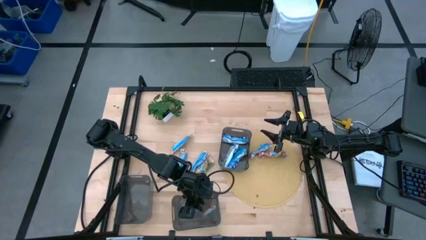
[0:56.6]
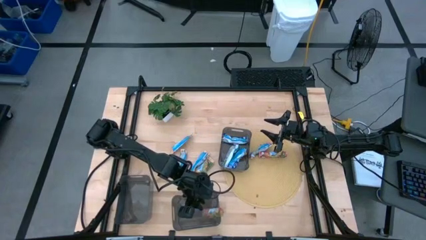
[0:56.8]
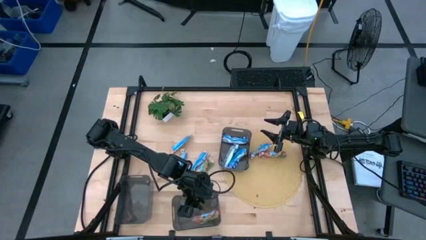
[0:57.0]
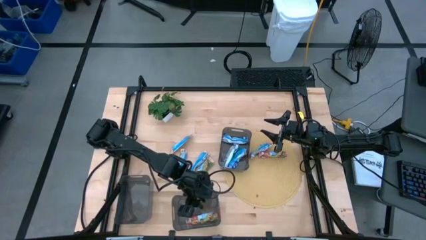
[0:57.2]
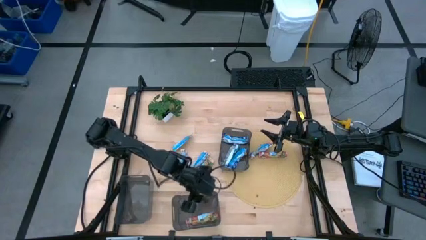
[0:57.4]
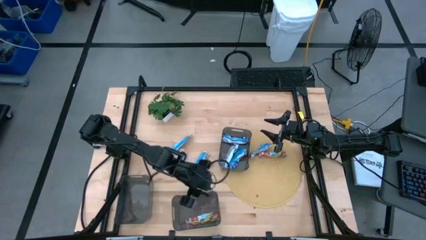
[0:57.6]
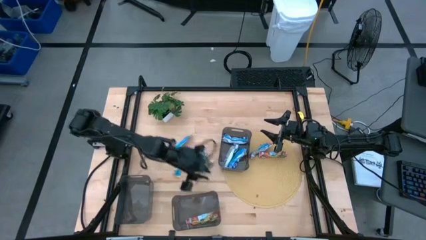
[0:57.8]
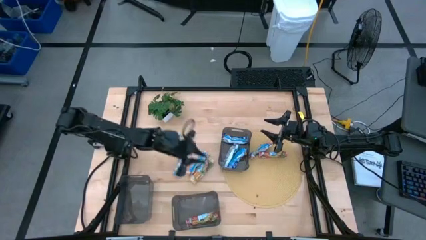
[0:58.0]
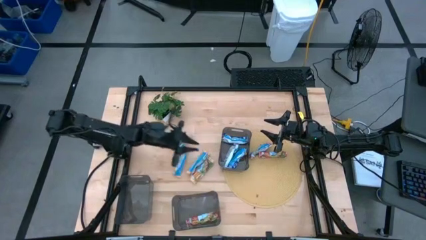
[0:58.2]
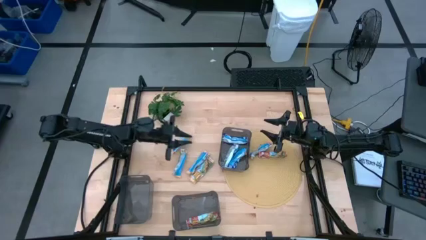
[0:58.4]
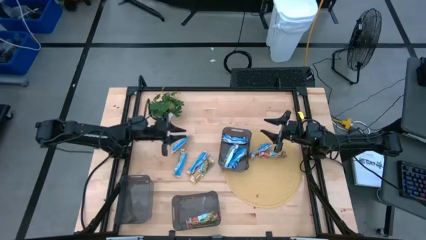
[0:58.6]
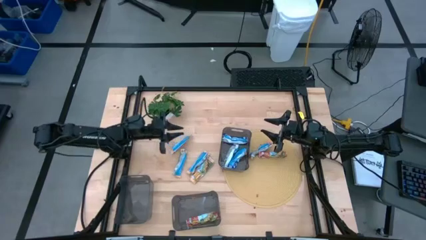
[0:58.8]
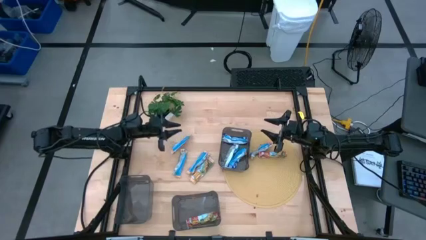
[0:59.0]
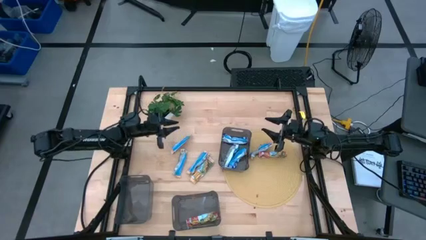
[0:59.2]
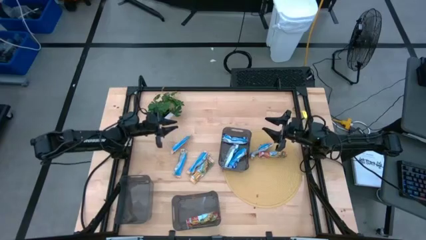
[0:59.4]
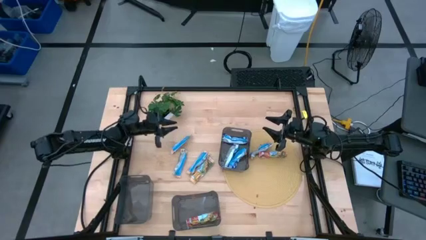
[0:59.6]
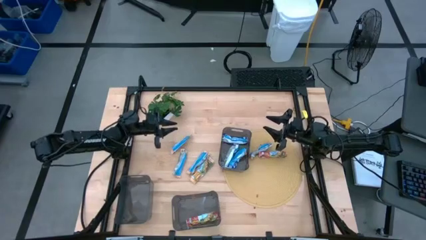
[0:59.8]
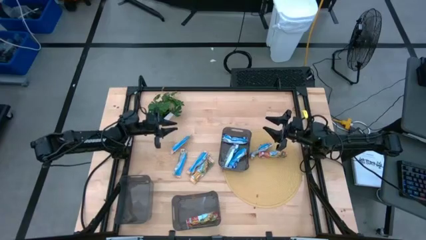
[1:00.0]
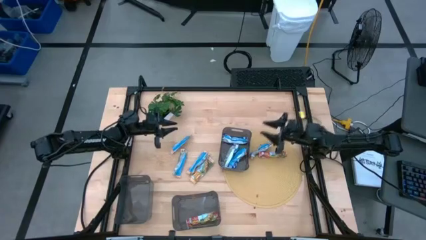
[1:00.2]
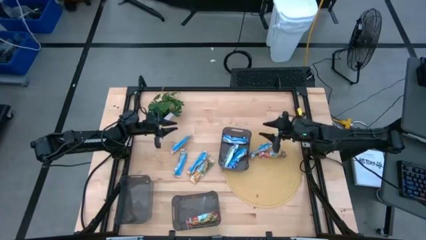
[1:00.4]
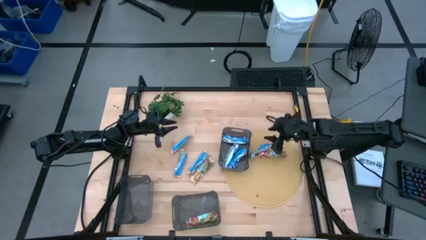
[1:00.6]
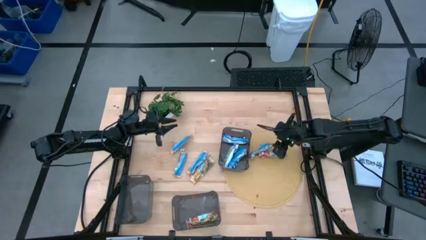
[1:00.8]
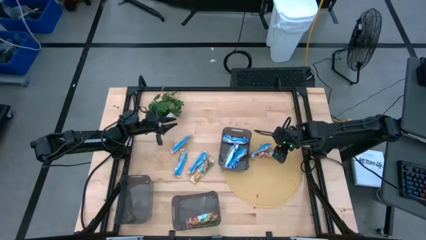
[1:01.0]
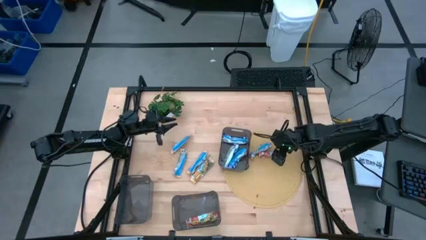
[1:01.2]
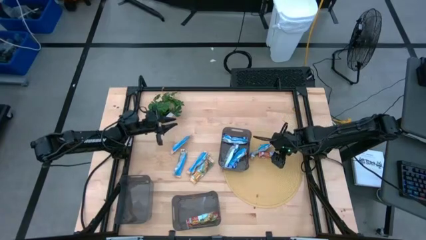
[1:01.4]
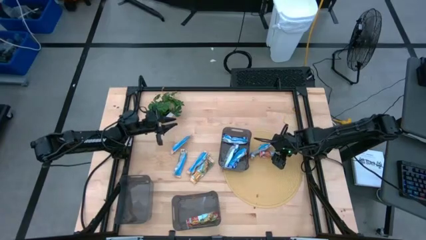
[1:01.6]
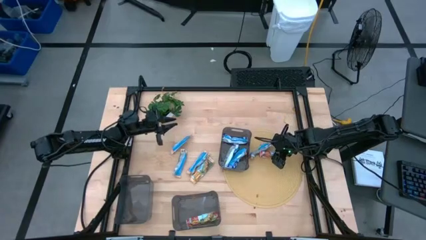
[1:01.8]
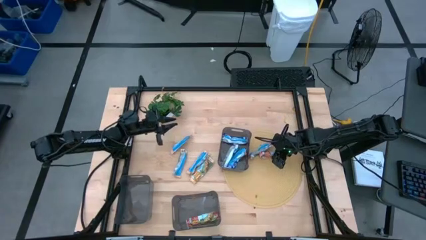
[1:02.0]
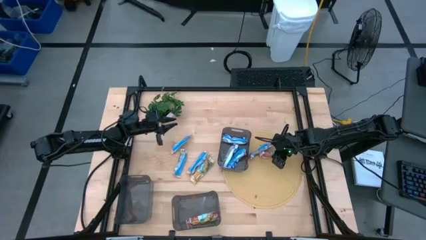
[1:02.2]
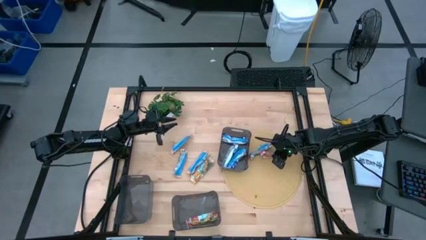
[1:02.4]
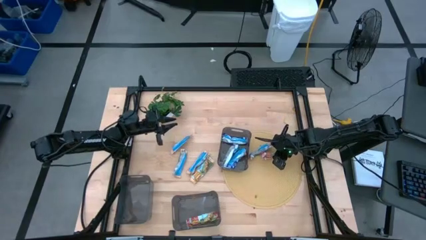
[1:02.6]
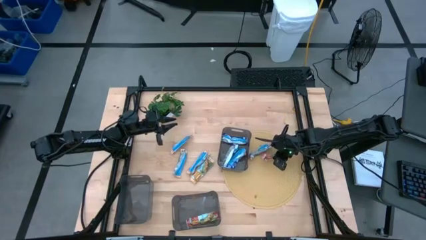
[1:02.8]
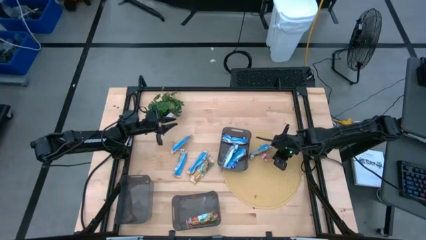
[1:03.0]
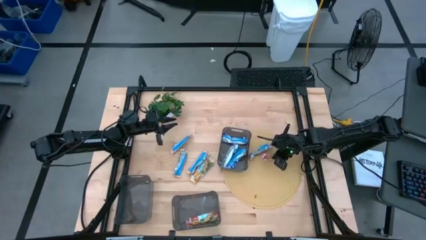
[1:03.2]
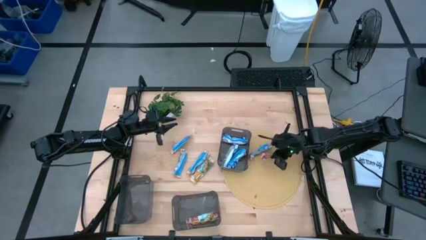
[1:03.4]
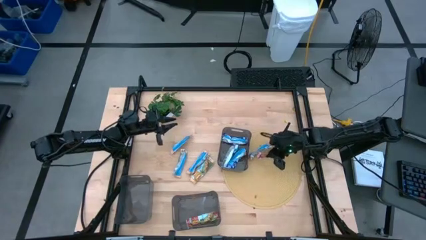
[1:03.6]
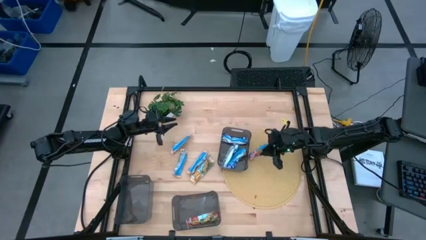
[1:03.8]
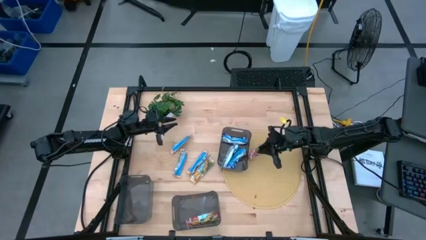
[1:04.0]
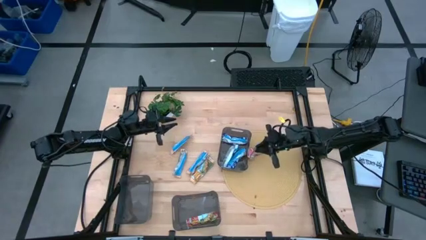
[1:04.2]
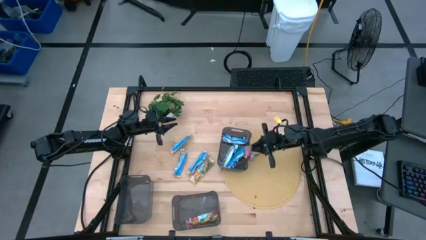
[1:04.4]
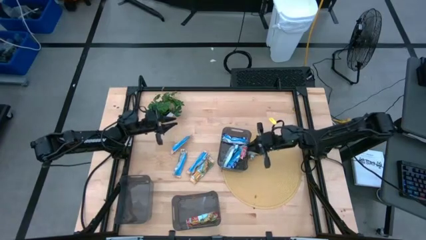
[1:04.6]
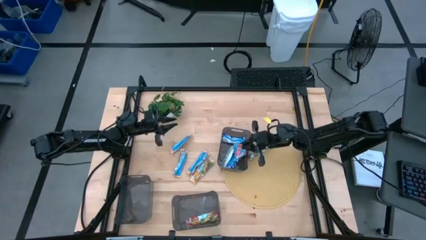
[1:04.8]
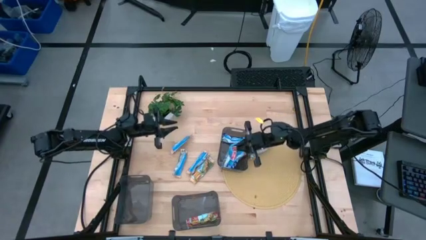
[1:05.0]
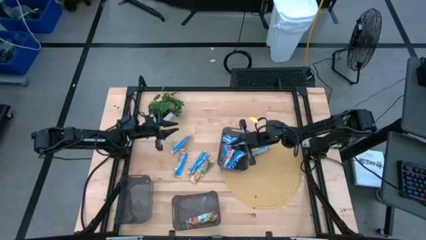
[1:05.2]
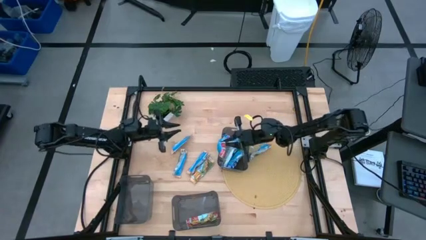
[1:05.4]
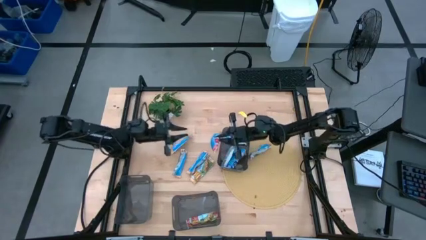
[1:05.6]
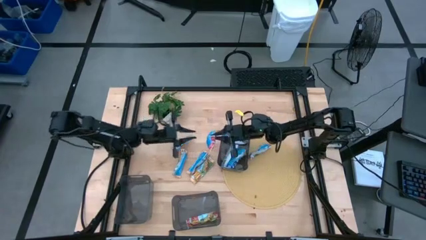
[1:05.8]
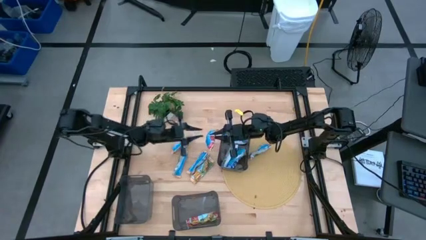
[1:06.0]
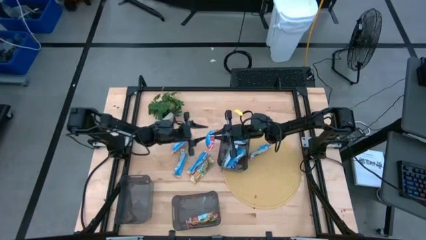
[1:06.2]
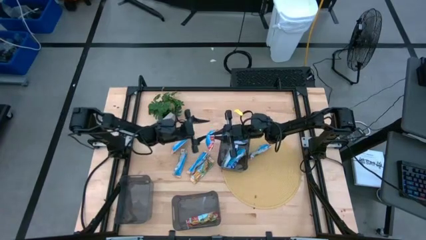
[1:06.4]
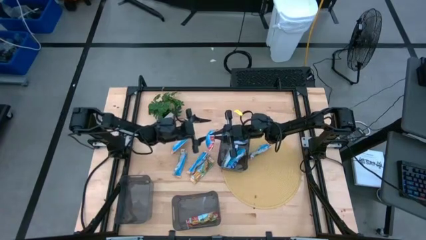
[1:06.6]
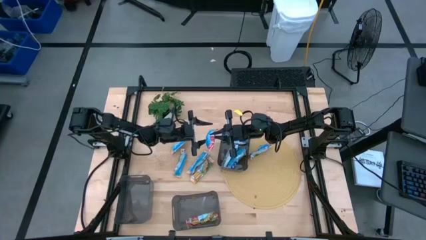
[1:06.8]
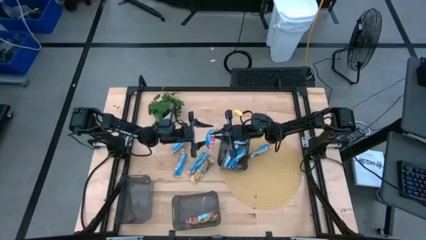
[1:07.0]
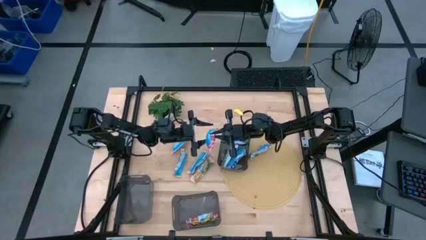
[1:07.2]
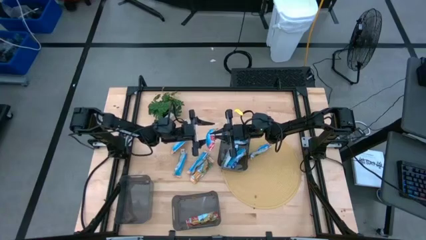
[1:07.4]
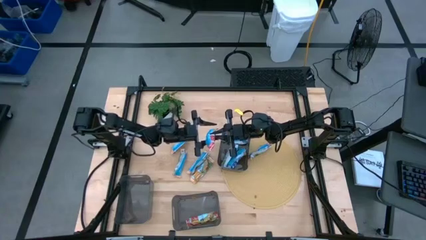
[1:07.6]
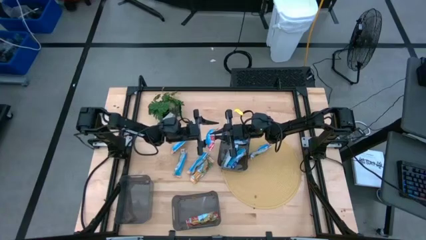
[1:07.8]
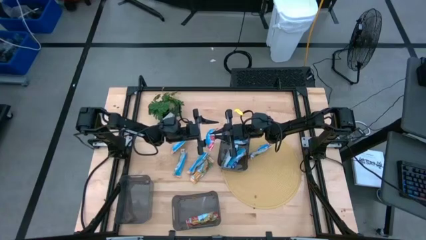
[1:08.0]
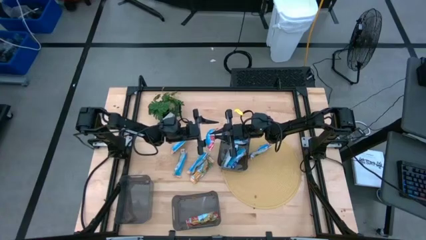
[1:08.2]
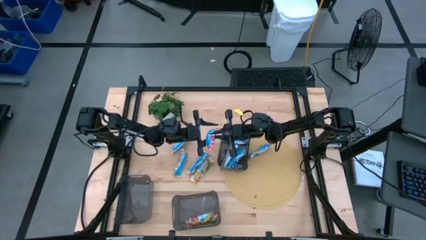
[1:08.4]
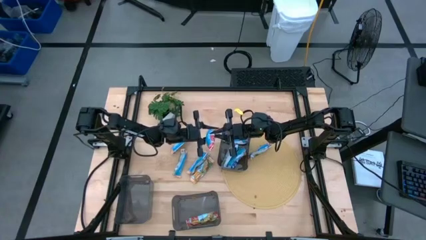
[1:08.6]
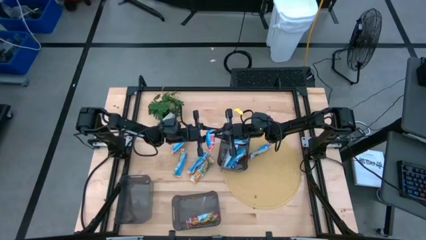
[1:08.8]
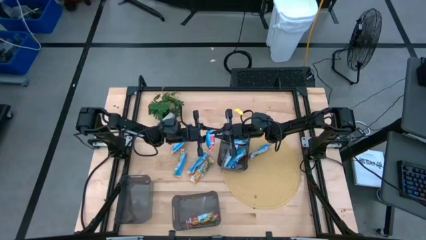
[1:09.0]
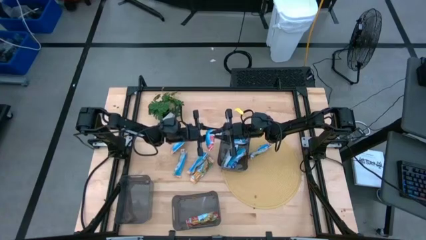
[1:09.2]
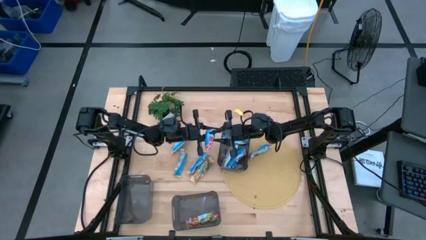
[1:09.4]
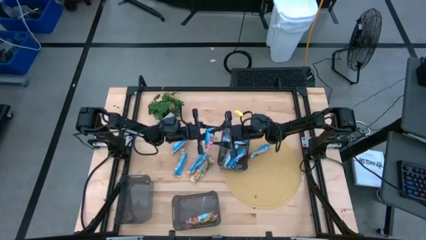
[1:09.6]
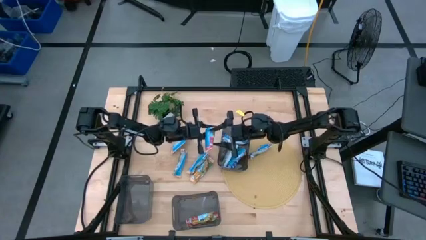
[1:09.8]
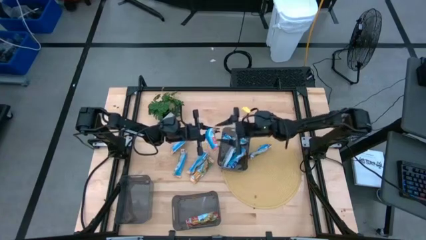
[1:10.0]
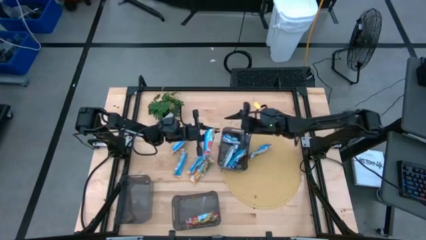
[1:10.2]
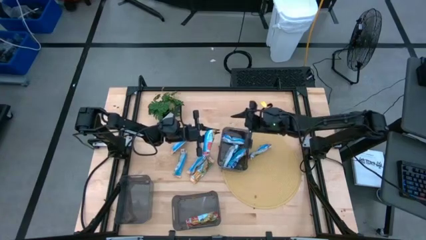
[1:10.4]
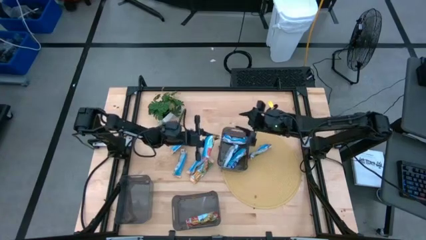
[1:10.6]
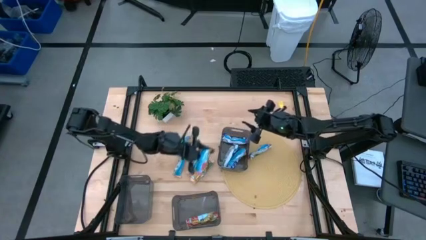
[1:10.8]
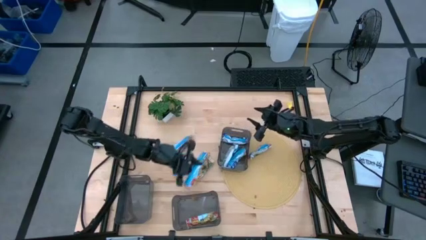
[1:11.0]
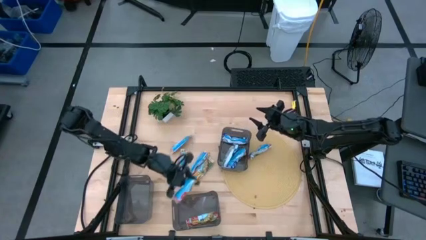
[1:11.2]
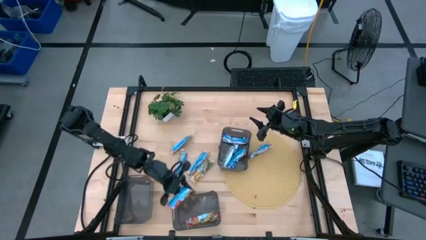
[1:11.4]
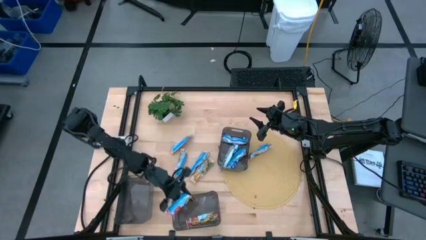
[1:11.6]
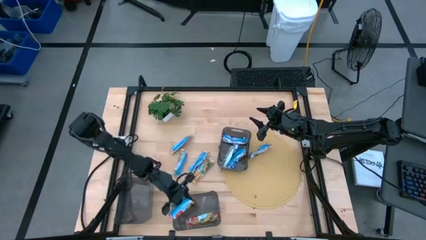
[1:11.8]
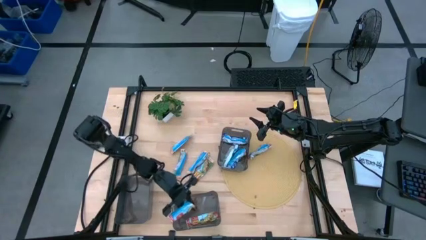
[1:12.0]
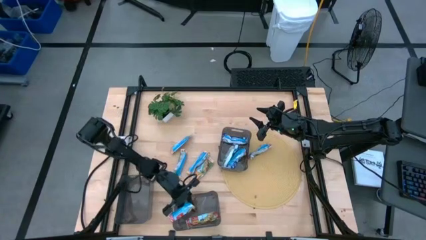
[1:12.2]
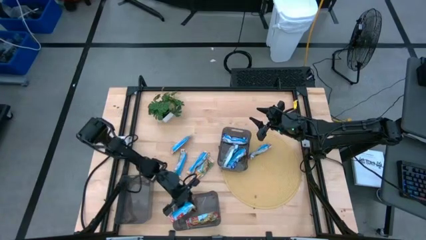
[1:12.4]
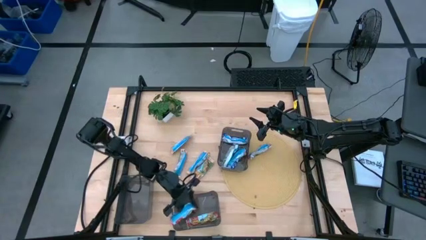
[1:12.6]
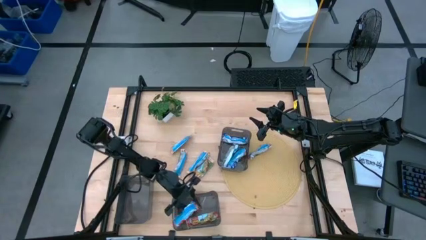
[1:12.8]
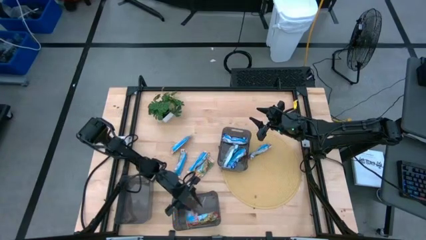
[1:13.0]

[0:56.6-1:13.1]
Task: Pick and place Granola Bars by type
Put the bottom red granola bar into the bottom right black bin
